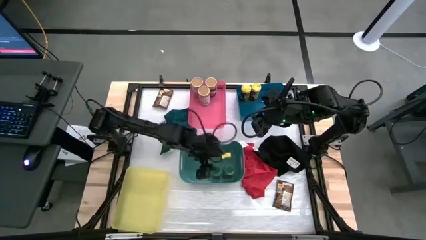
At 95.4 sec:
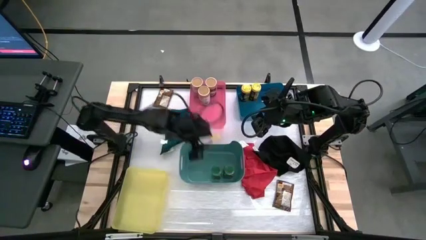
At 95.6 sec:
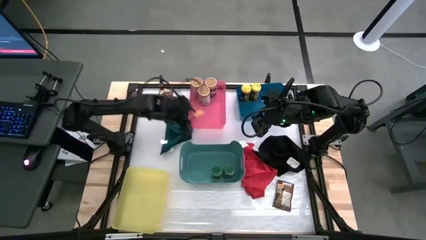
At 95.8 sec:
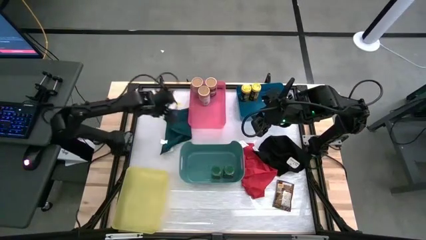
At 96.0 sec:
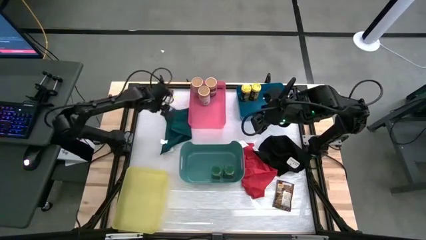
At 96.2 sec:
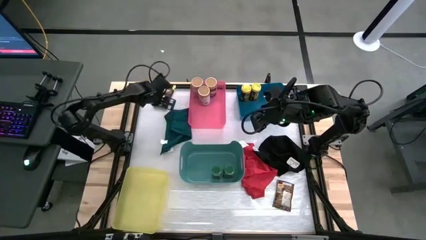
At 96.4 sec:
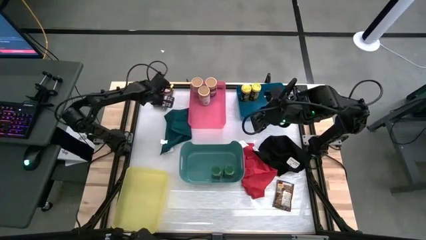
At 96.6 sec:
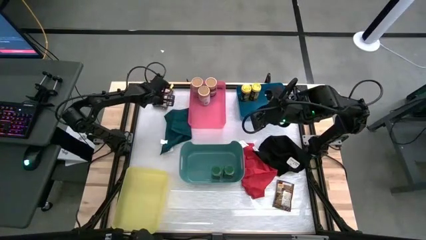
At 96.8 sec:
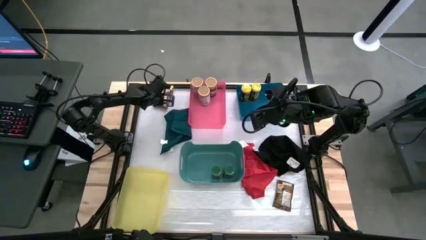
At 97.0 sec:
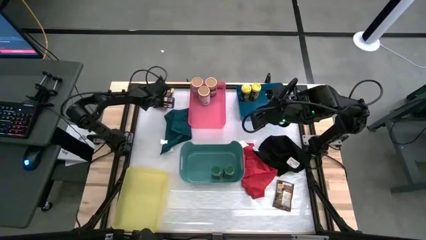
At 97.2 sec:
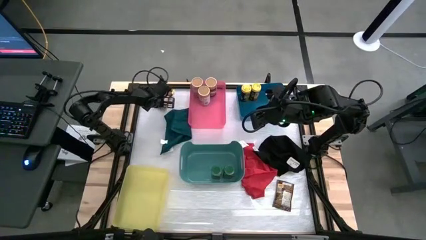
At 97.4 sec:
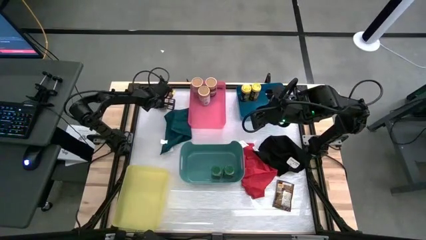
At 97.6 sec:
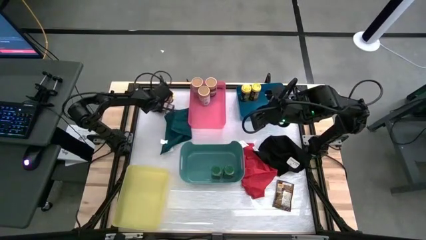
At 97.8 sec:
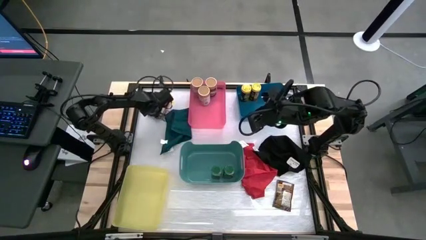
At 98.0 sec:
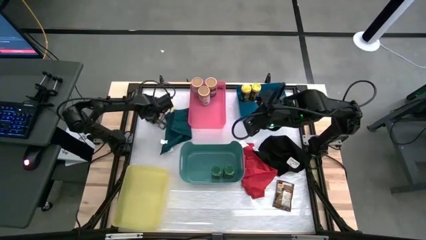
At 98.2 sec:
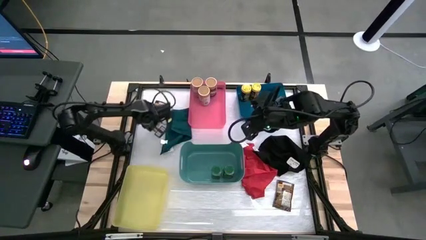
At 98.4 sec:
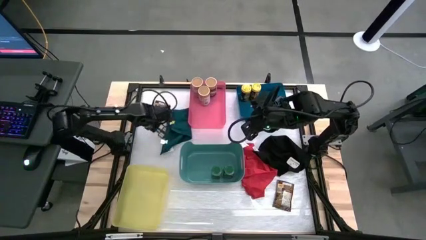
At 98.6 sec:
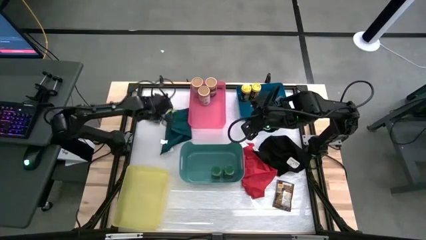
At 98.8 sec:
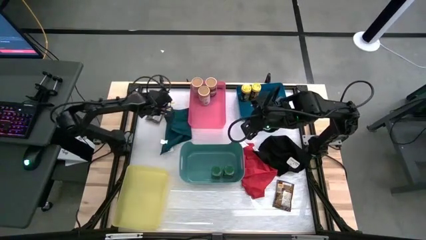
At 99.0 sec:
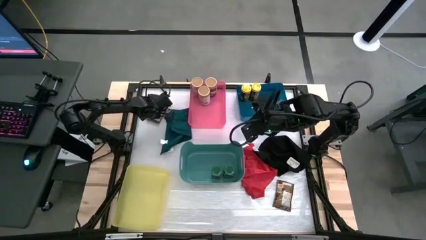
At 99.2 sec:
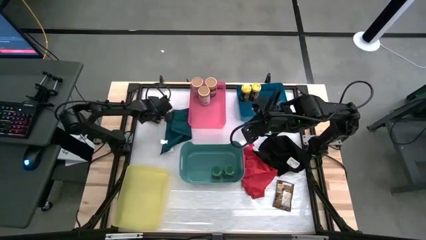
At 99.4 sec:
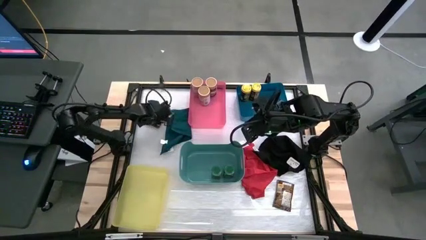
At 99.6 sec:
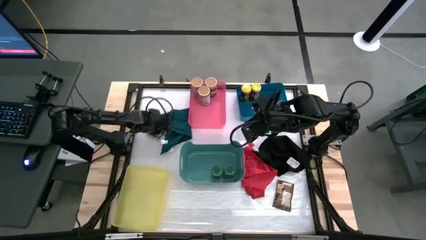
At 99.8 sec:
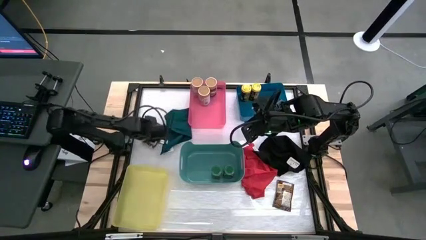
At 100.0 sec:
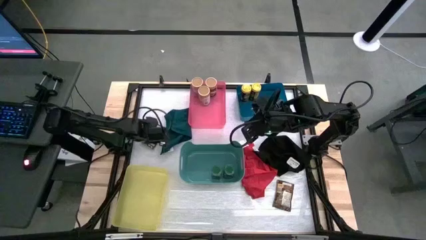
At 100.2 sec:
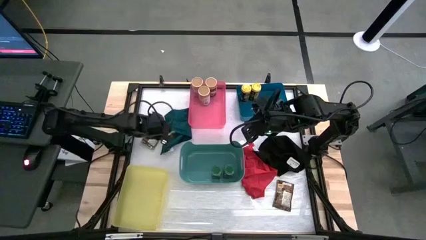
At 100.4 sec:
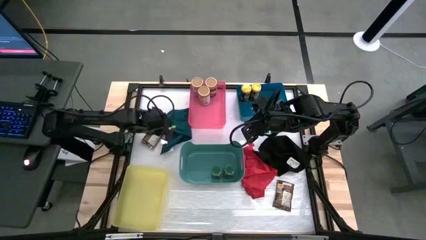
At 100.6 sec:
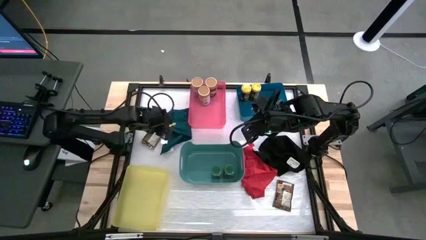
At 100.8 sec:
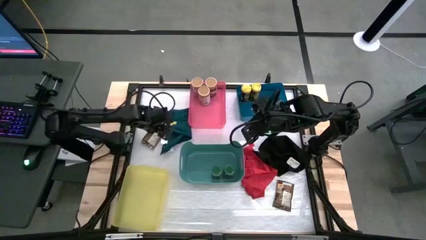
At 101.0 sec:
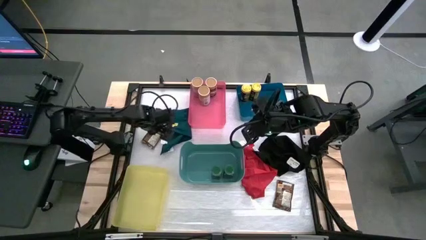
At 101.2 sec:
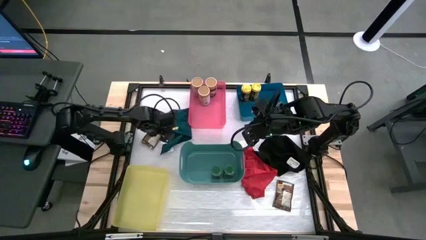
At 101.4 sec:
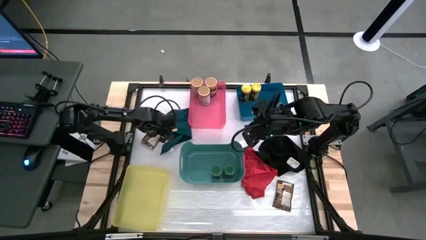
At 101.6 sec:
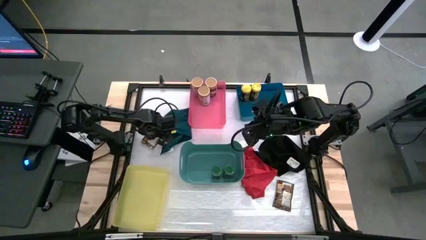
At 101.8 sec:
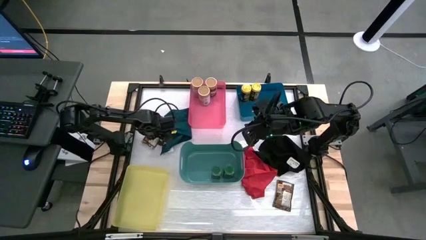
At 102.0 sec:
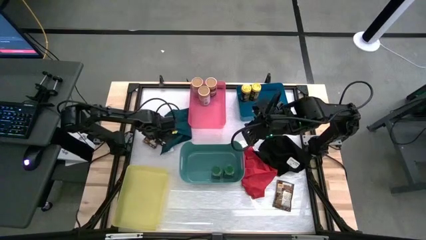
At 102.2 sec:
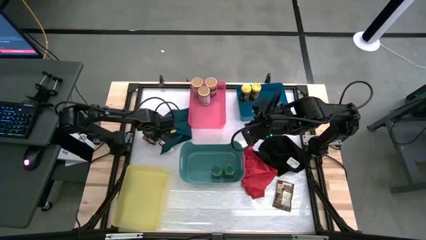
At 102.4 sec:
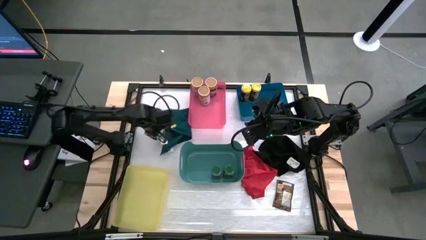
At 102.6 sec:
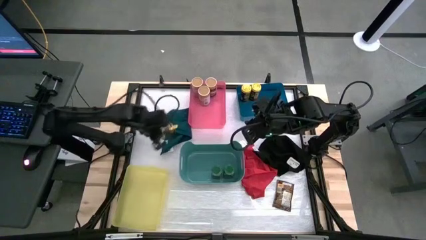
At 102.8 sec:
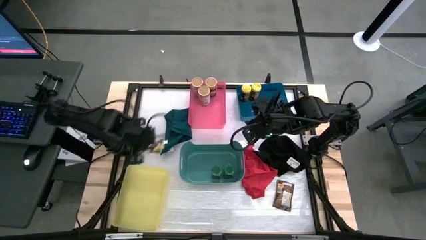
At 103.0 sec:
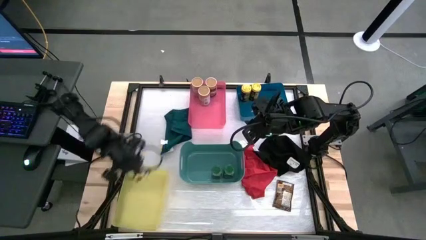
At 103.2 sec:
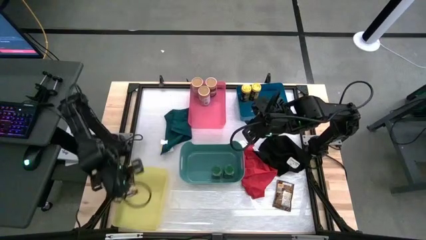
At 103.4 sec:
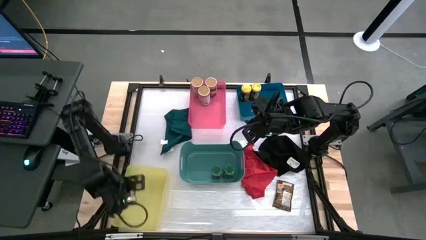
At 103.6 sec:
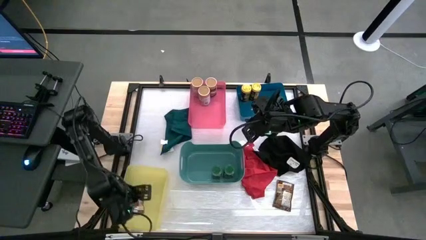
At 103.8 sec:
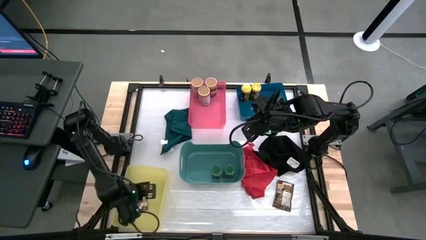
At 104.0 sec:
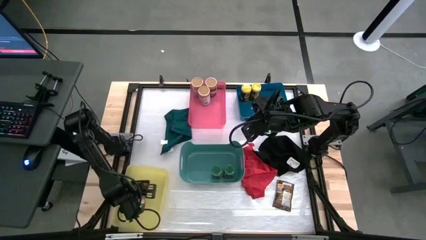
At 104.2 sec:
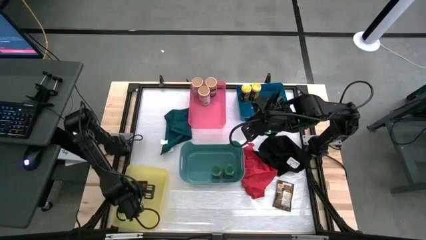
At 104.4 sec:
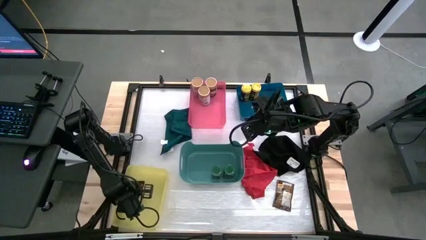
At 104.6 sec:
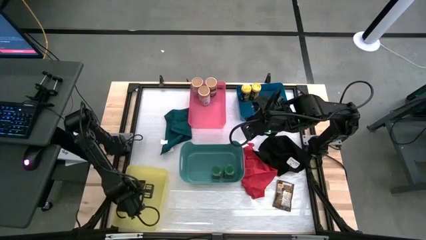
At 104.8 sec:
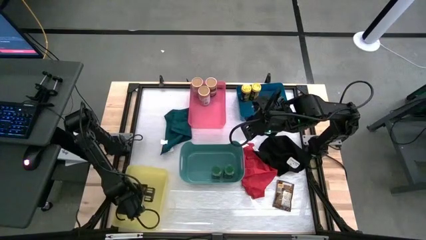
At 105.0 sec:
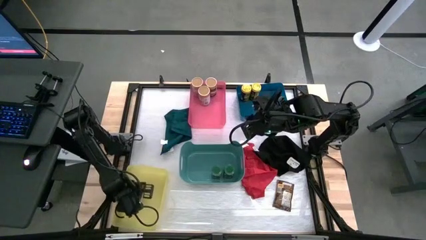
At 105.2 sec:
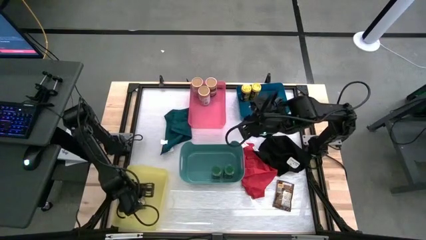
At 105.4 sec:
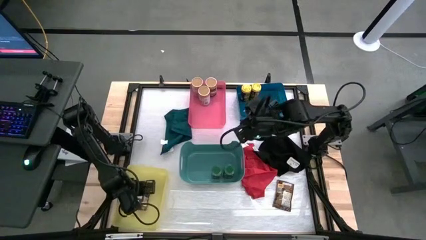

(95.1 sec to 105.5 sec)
Task: Sort spices by type
Put the top orange seasoning pack into the yellow bin

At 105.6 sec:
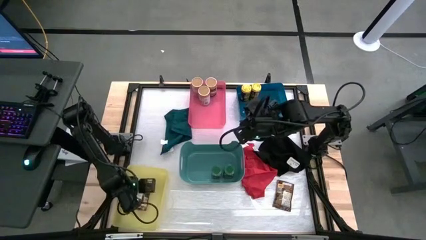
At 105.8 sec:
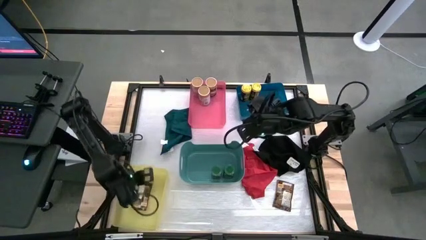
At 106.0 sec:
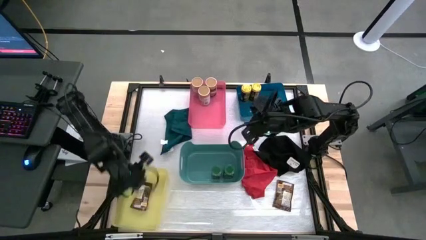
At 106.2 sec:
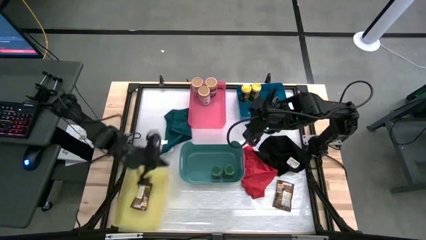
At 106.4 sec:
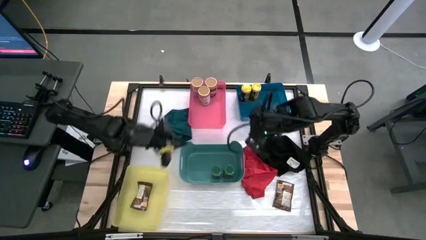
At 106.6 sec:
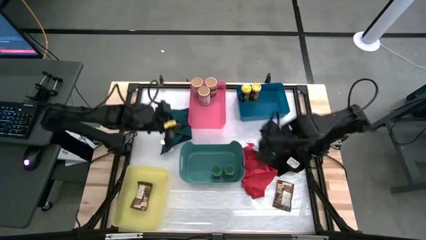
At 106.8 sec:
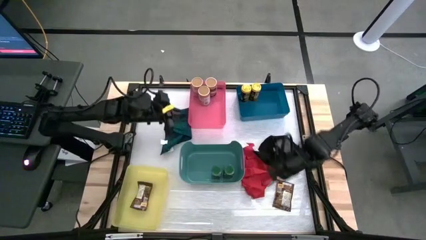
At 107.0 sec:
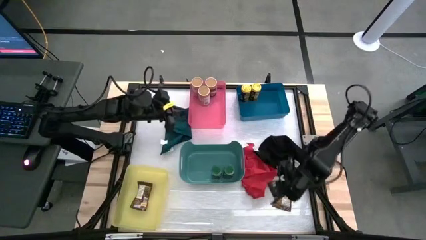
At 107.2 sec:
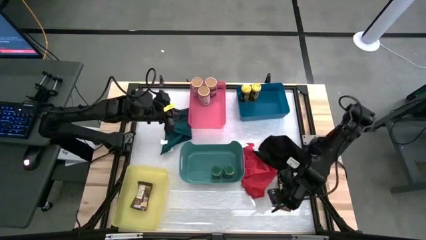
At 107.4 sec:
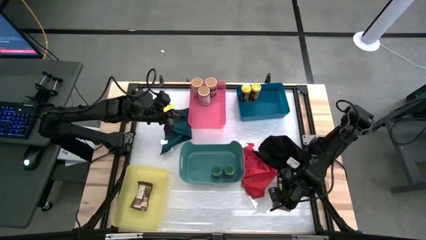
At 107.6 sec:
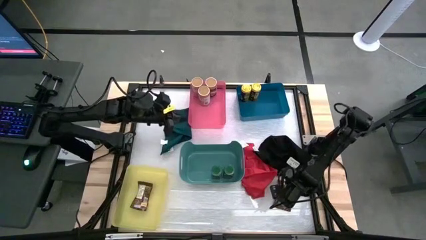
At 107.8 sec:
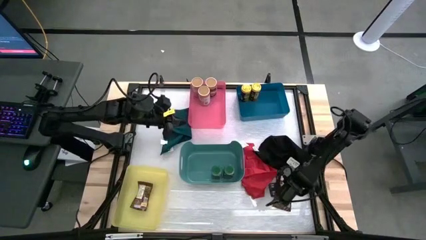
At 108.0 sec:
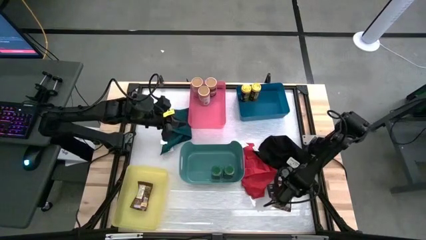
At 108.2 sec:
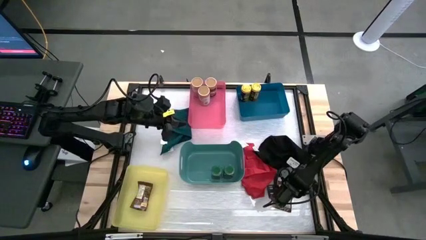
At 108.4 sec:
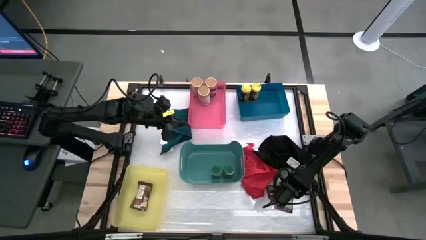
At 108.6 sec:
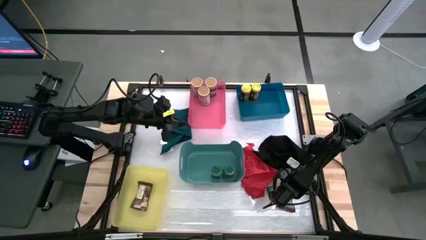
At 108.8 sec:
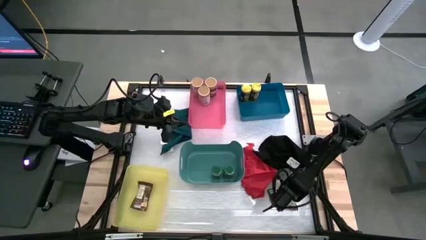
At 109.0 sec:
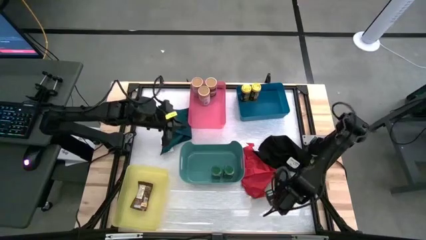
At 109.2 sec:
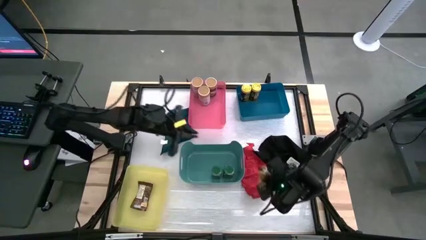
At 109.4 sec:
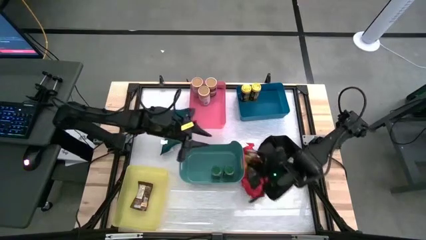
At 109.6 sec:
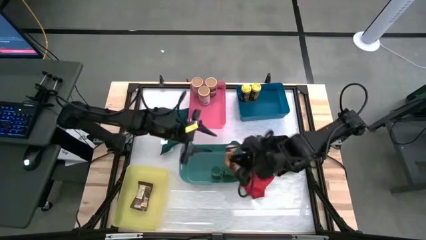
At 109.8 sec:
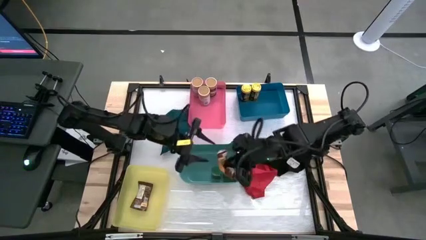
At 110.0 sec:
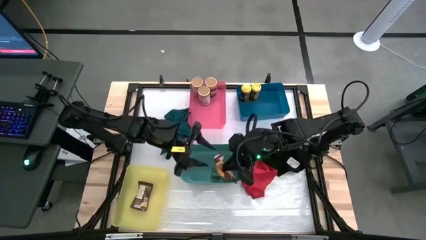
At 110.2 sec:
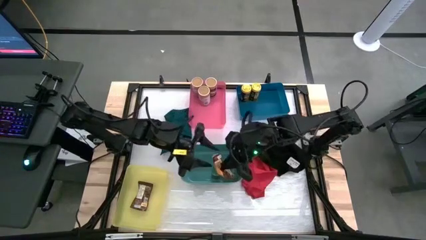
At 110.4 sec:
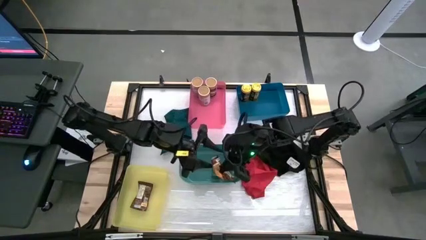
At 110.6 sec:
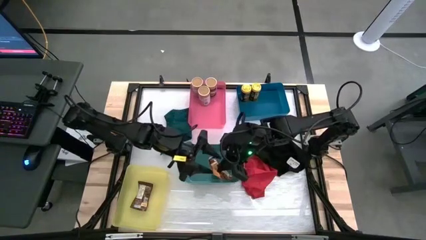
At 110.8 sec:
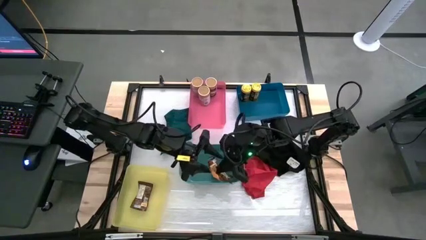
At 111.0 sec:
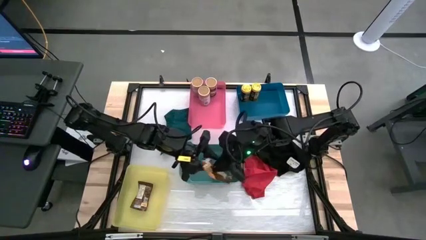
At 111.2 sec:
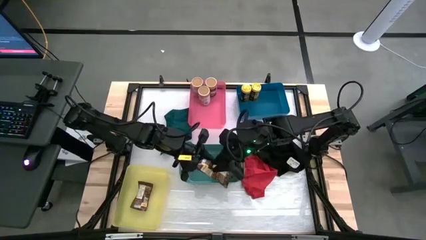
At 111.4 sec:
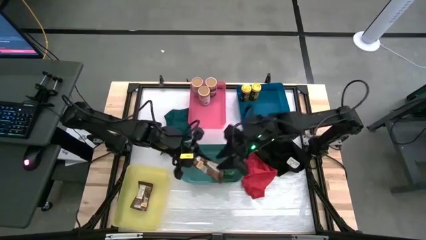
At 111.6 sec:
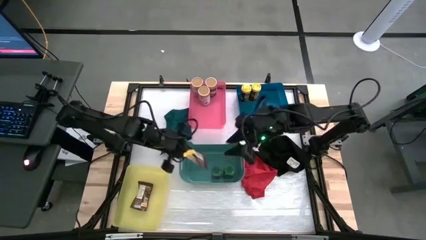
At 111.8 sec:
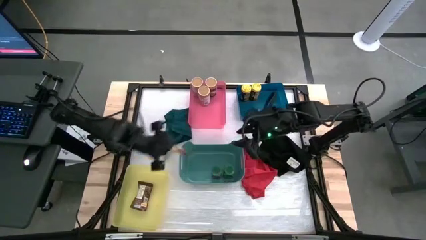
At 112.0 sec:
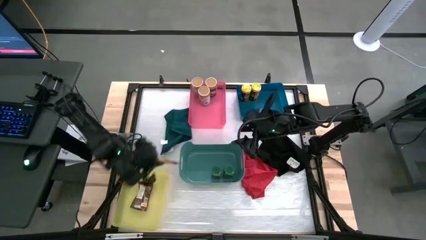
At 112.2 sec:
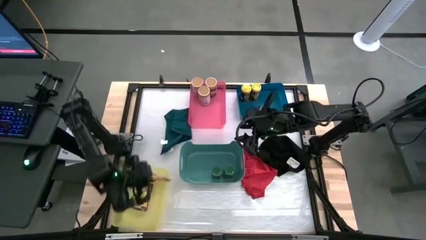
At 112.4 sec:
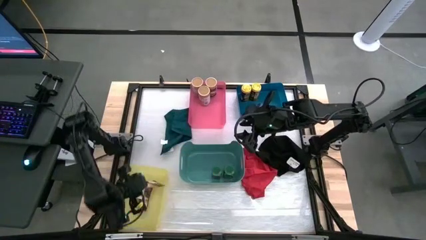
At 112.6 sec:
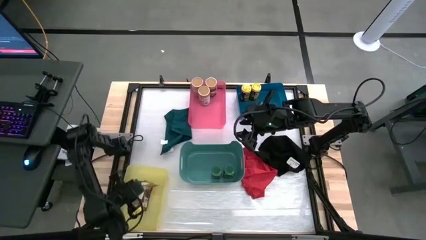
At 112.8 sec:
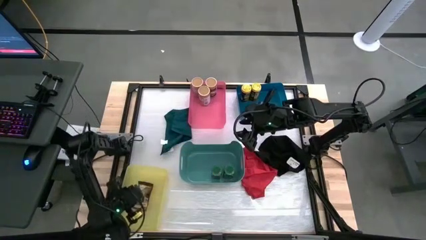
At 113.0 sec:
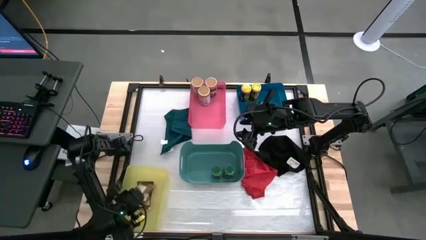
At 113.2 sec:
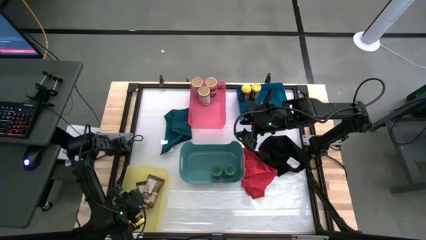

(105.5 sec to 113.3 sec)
Put the orange seasoning pack into the yellow bin
